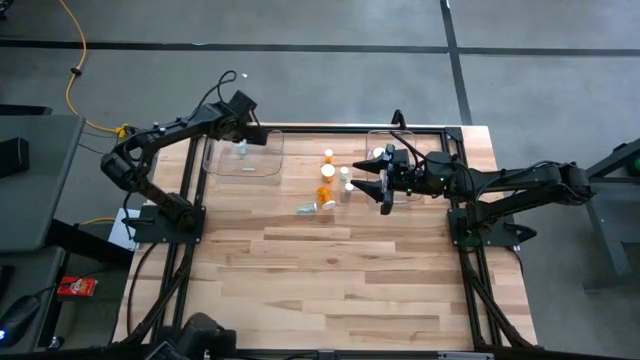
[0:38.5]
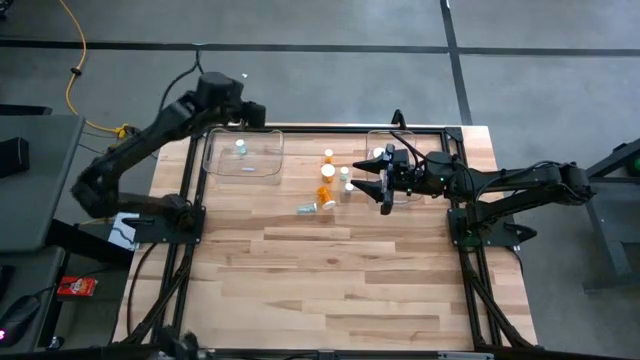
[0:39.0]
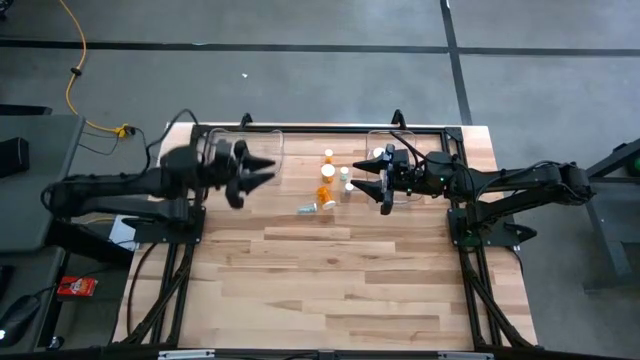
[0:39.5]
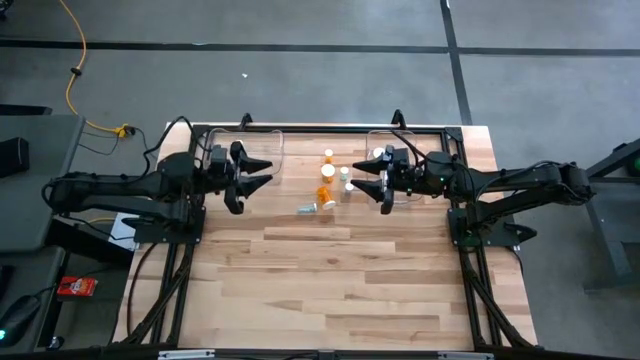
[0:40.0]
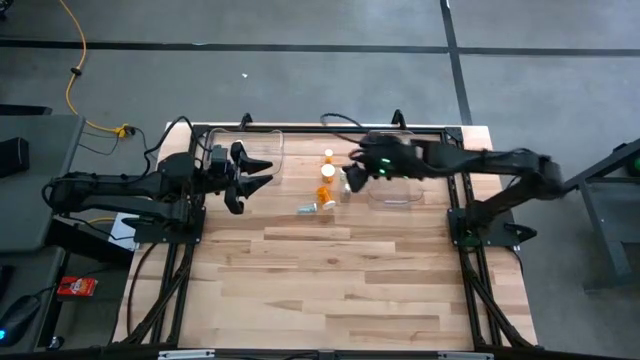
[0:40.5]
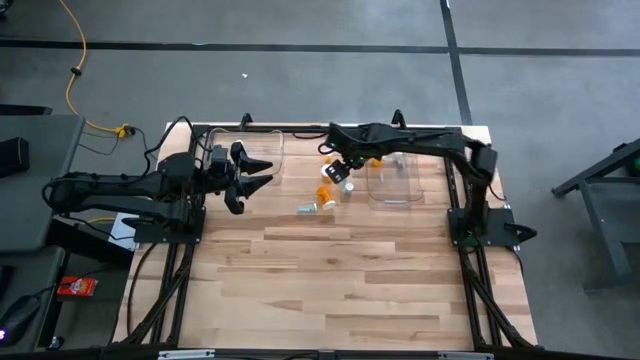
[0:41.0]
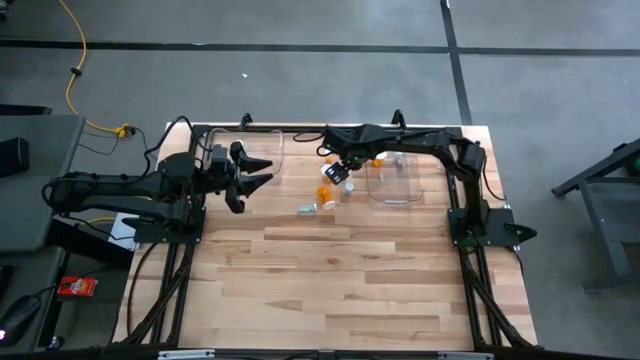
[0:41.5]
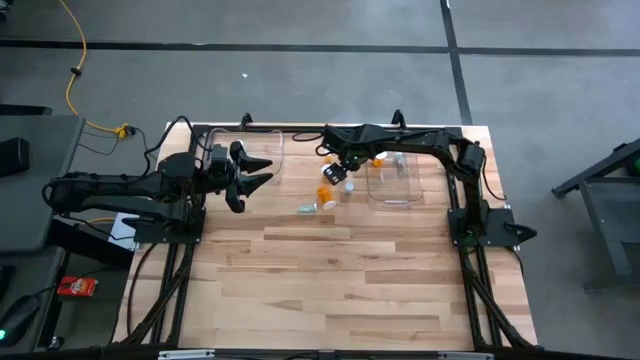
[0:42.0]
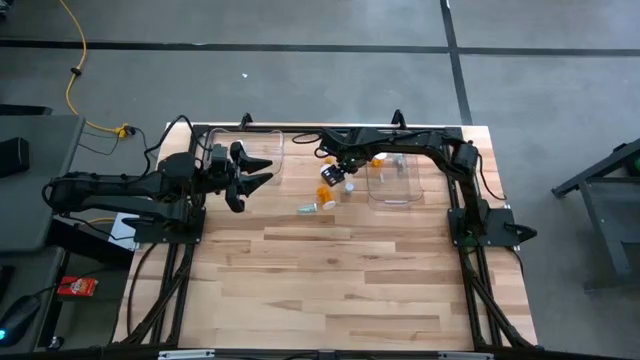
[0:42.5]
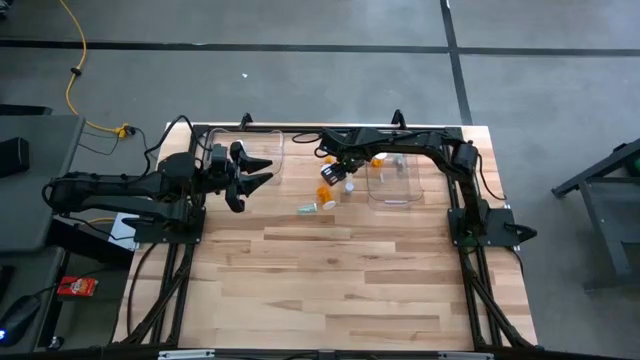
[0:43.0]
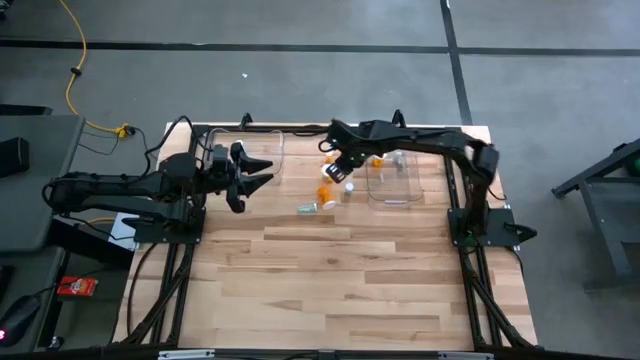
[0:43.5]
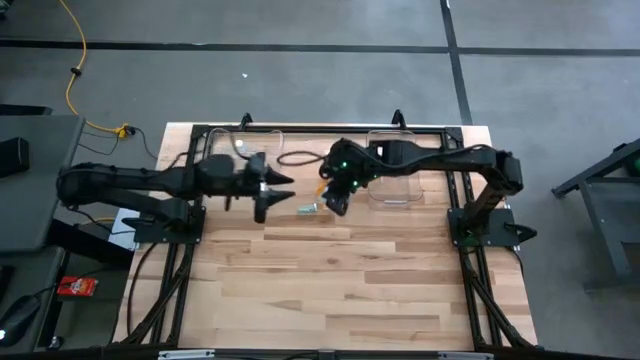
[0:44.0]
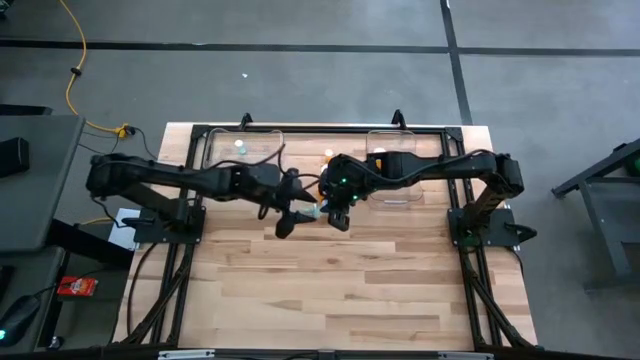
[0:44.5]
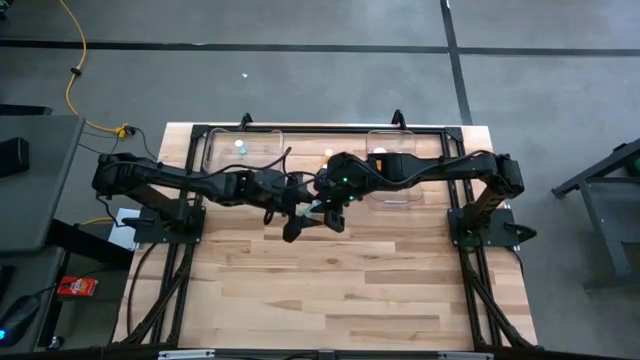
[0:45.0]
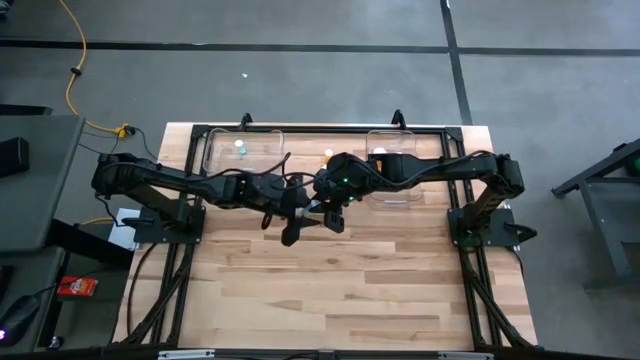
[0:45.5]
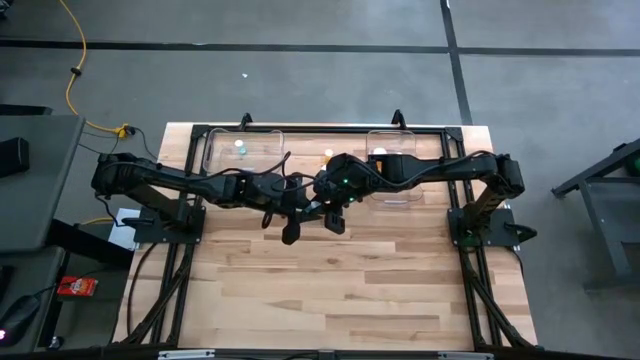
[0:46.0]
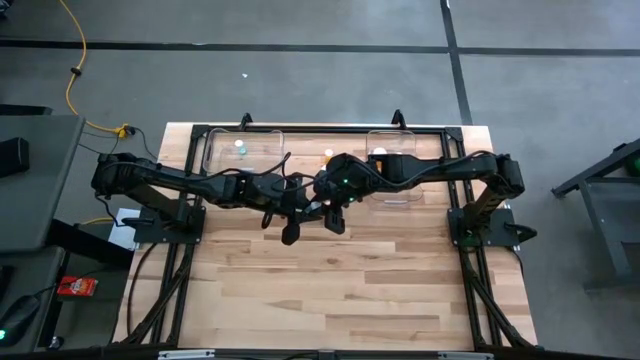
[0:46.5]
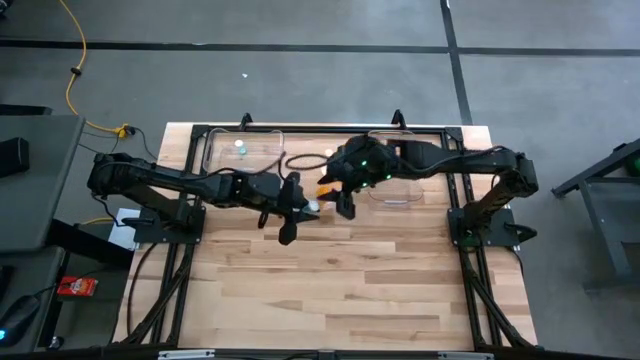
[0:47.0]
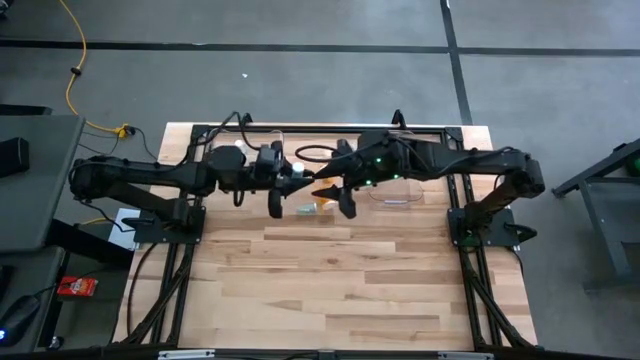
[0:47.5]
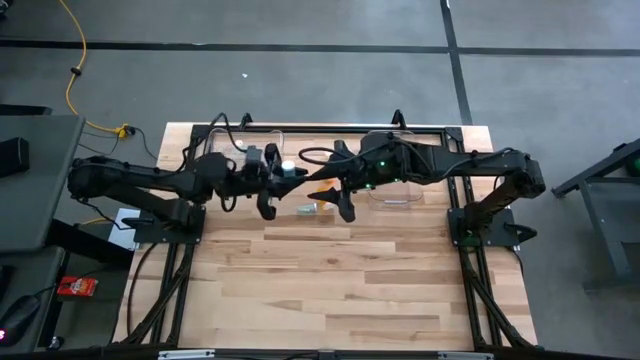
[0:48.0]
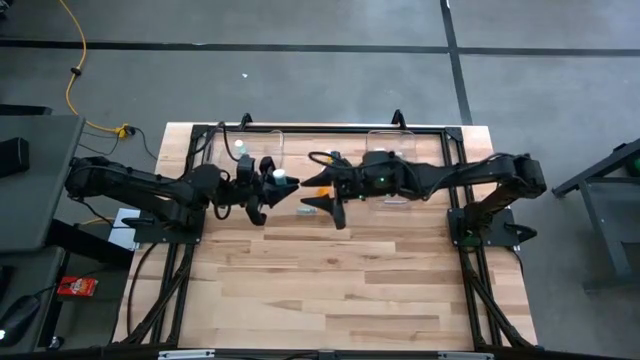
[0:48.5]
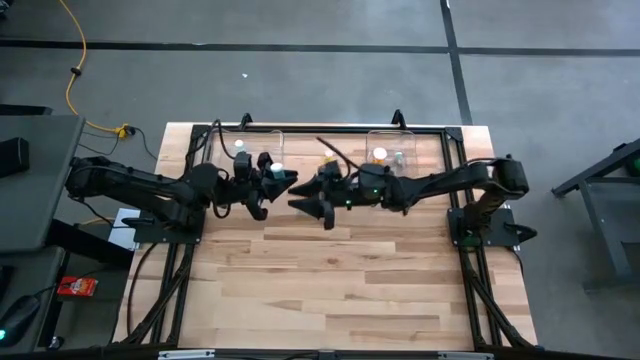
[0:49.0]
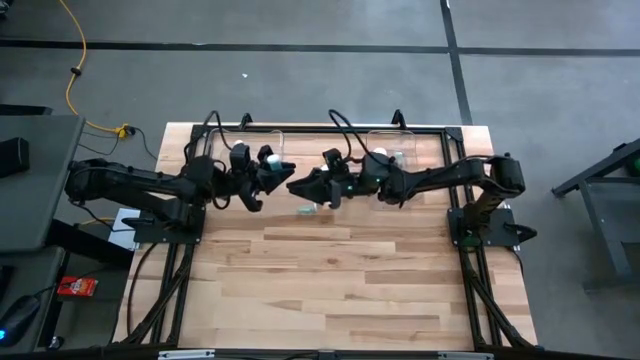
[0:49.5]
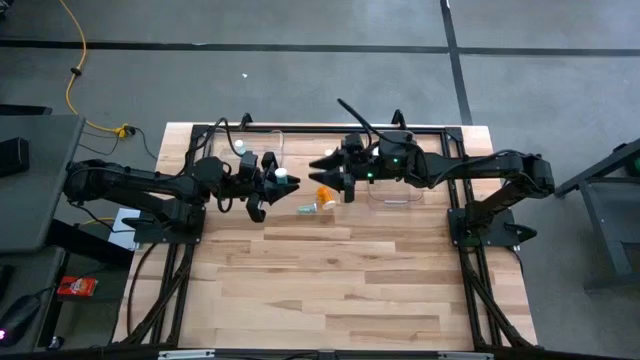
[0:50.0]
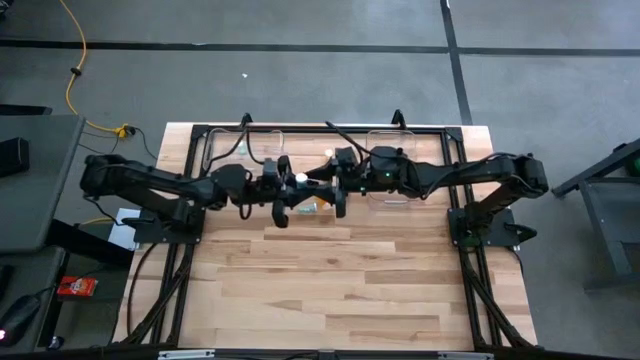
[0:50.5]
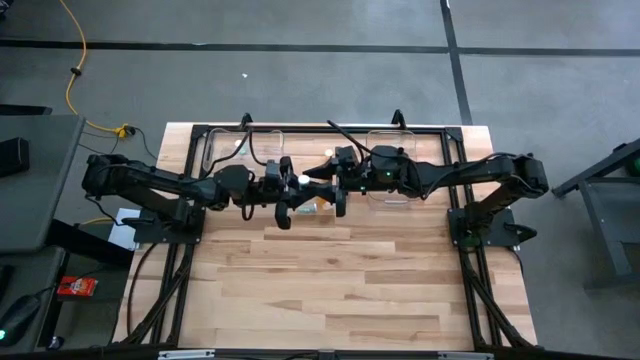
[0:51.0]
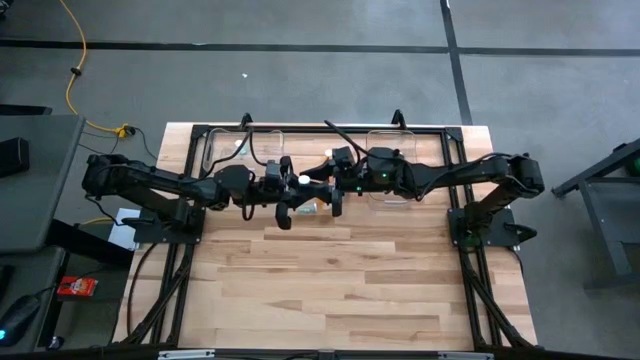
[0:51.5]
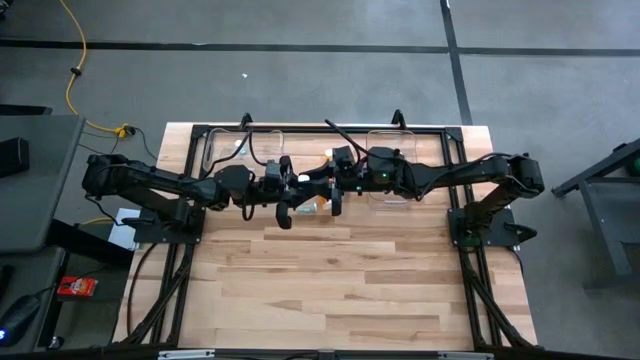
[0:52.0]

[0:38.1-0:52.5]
Task: Pick and place medicine bottles into bin by pill shape (circle, oval)
Put the blue tablet bottle into the left transparent bin

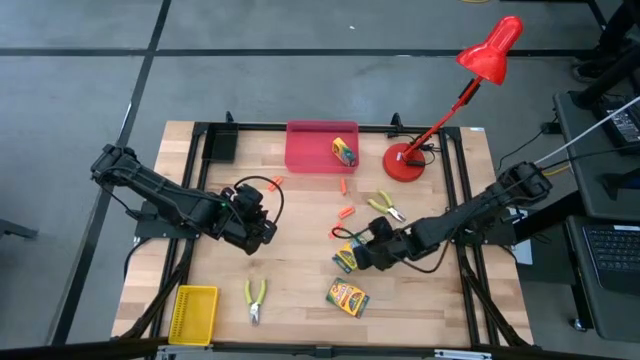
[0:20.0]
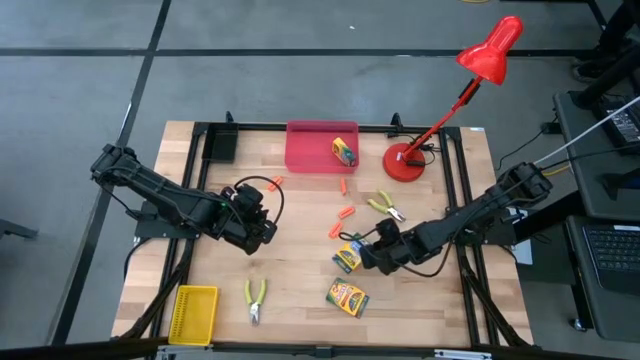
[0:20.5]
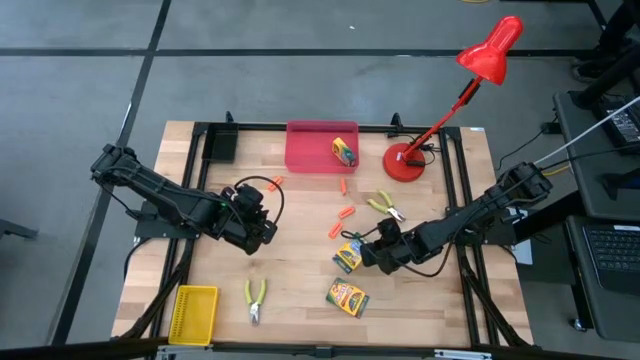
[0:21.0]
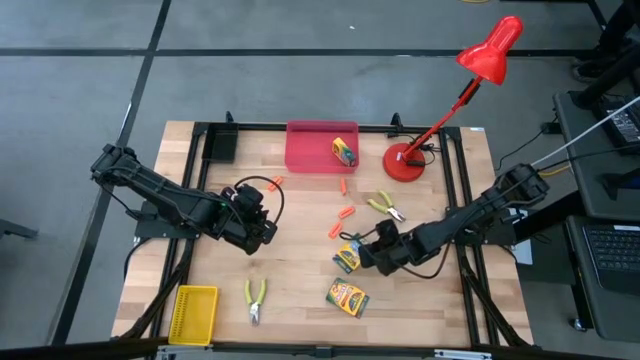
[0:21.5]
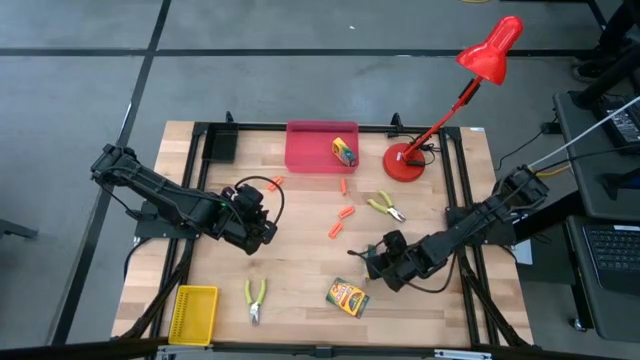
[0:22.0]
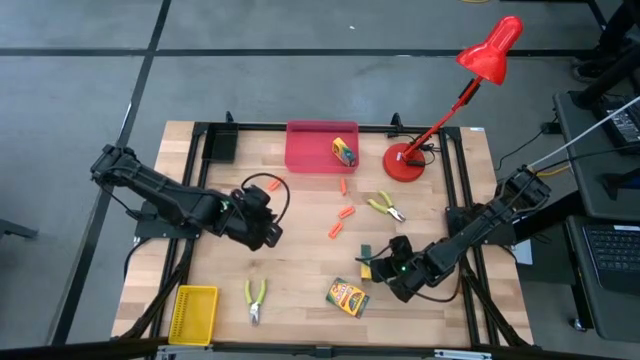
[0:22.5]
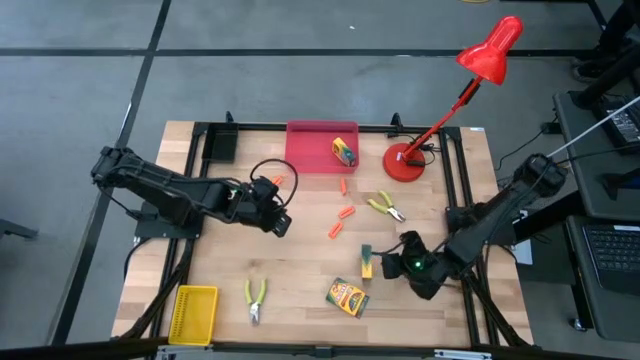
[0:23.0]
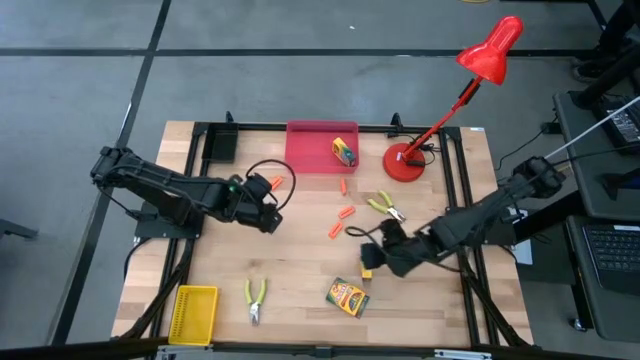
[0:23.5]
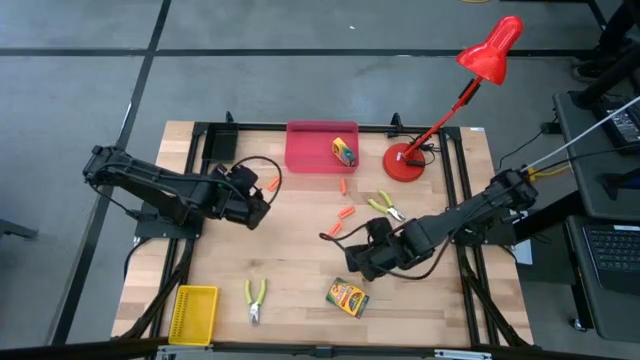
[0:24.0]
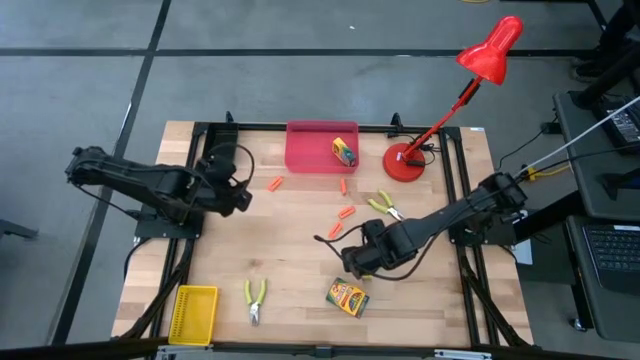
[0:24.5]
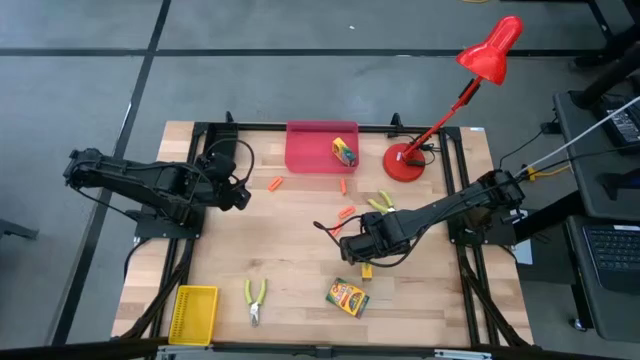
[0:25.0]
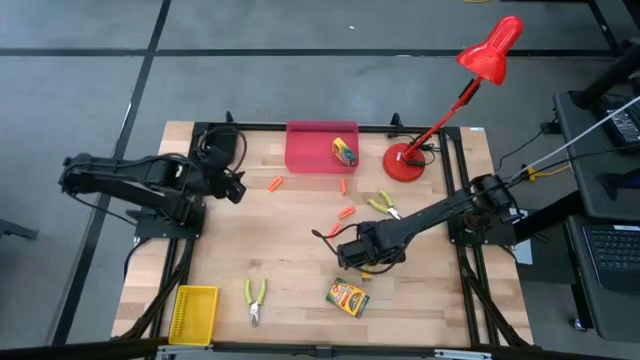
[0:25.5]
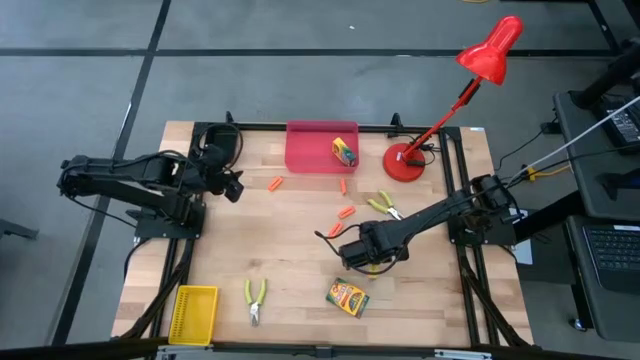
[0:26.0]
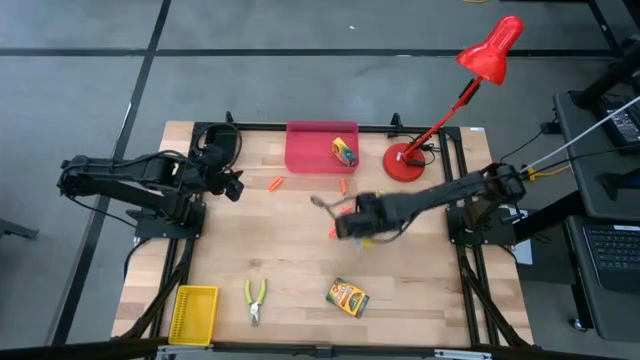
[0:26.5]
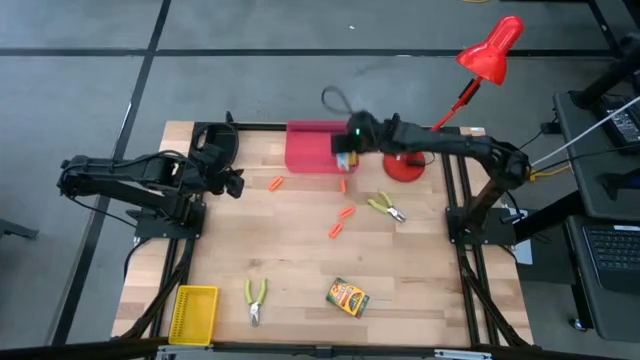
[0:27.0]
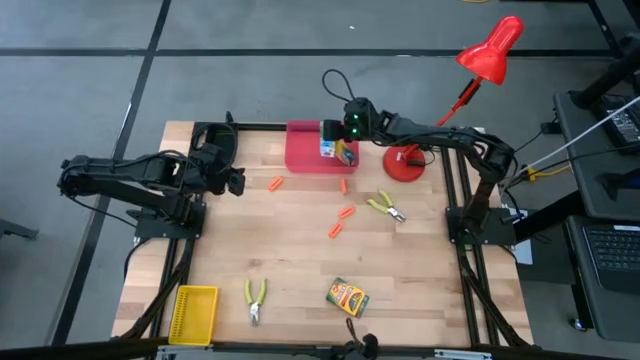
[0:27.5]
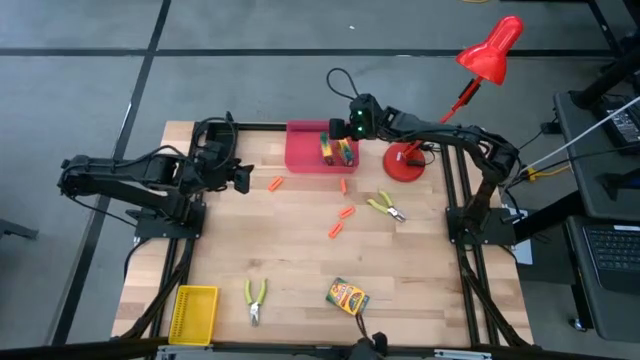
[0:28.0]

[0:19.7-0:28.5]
Task: Pick & Place School Supplies
Put the yellow crayon box into the red bin
